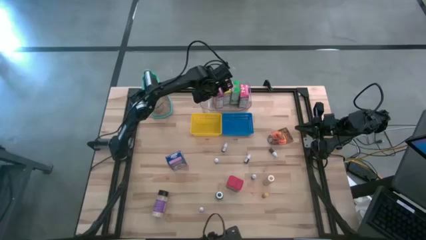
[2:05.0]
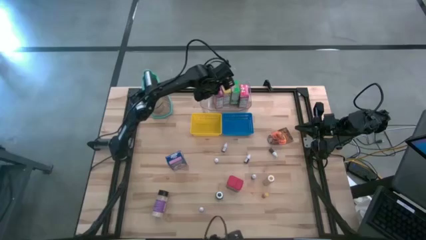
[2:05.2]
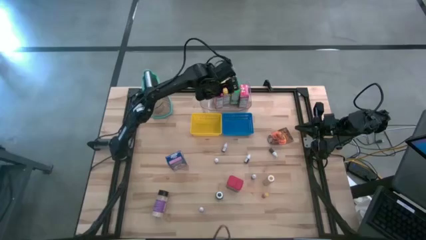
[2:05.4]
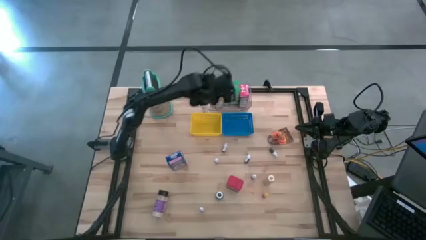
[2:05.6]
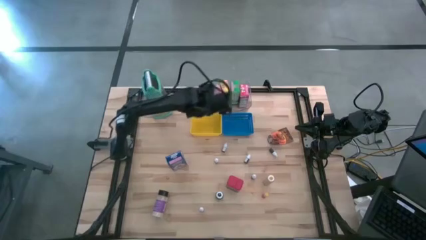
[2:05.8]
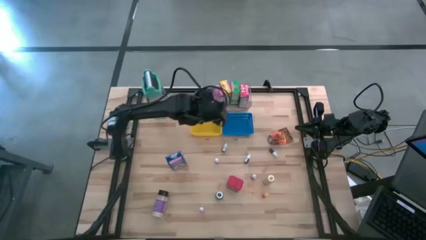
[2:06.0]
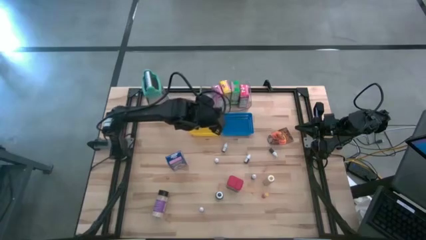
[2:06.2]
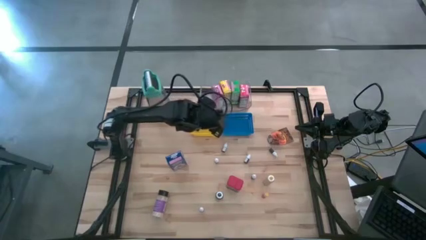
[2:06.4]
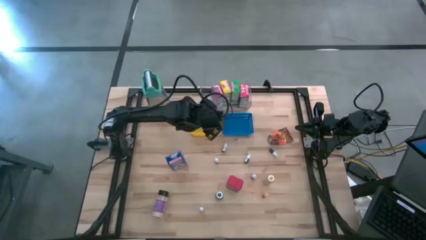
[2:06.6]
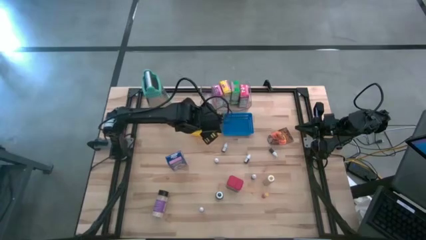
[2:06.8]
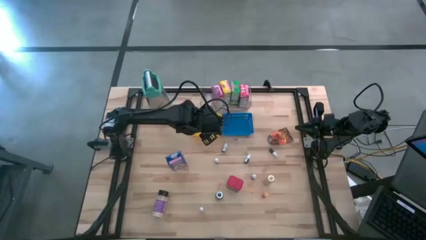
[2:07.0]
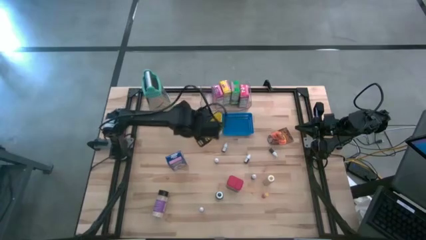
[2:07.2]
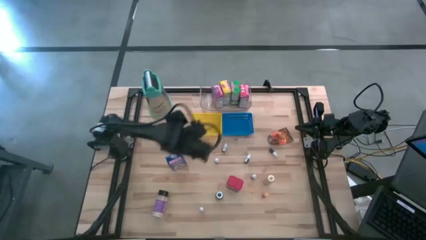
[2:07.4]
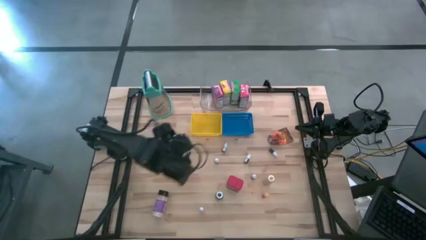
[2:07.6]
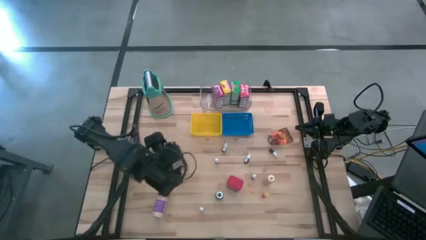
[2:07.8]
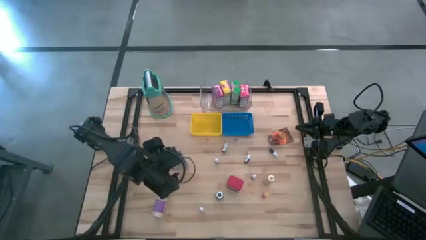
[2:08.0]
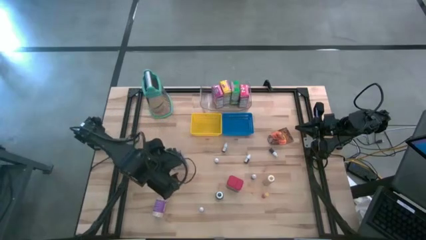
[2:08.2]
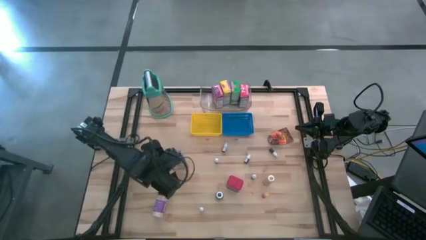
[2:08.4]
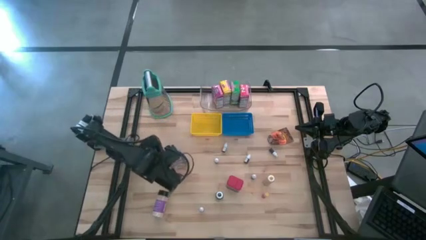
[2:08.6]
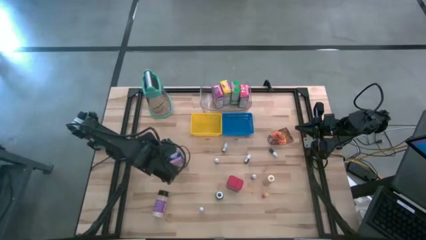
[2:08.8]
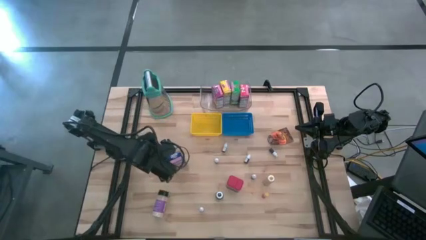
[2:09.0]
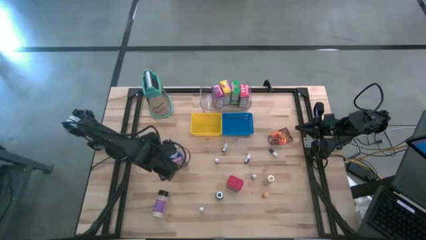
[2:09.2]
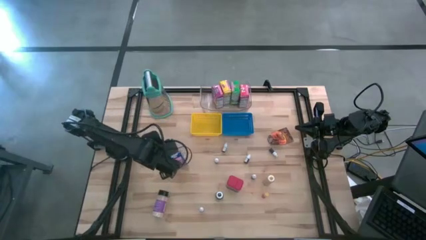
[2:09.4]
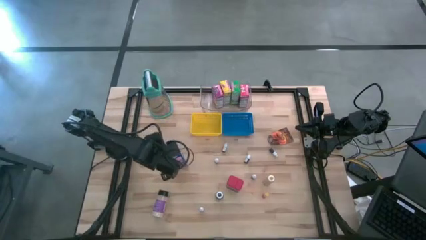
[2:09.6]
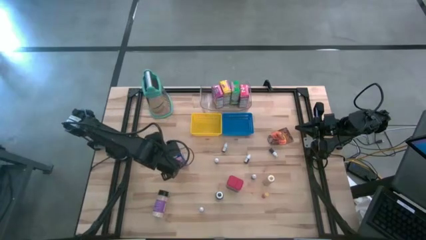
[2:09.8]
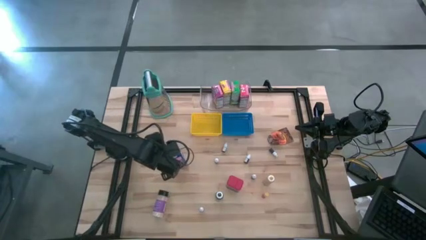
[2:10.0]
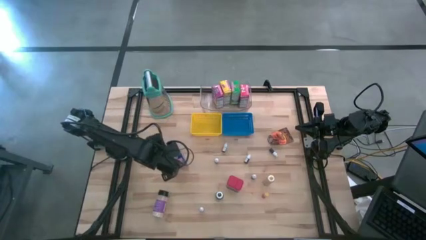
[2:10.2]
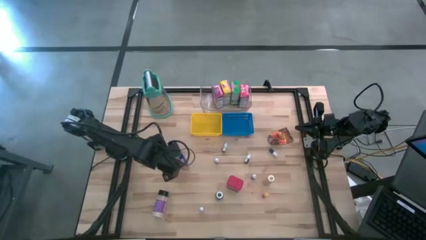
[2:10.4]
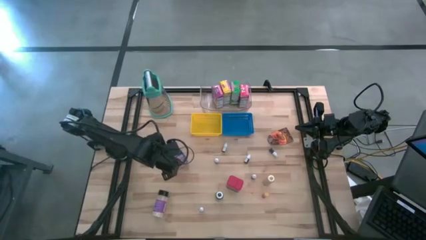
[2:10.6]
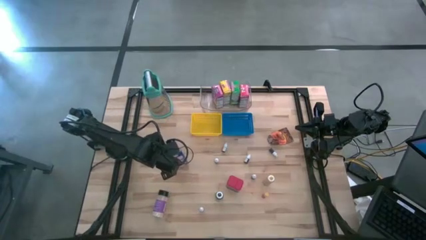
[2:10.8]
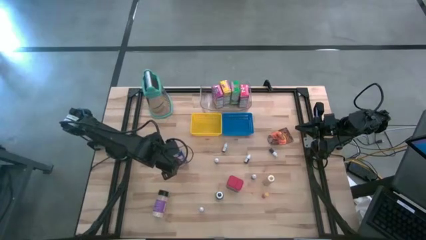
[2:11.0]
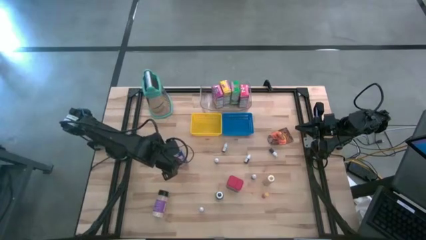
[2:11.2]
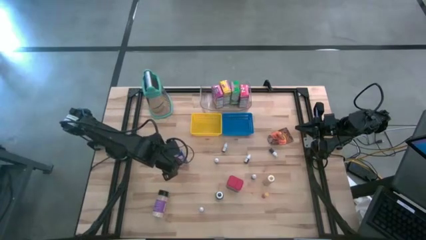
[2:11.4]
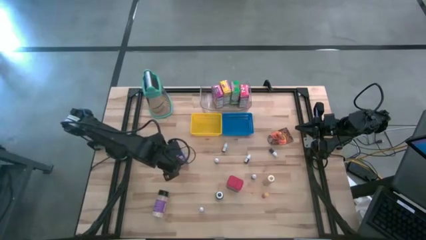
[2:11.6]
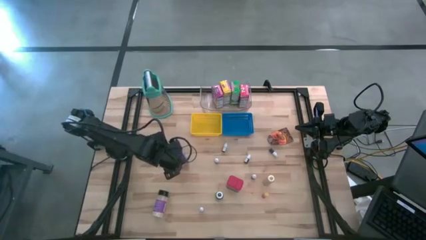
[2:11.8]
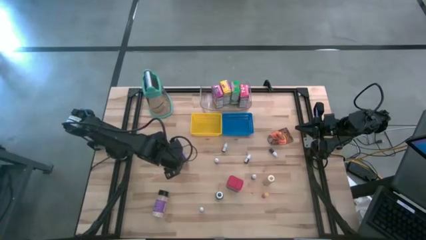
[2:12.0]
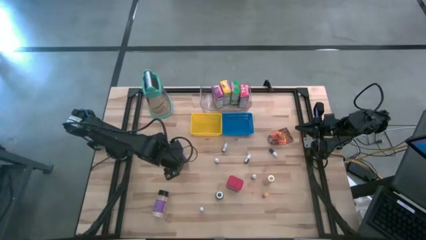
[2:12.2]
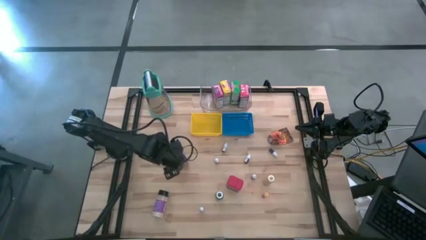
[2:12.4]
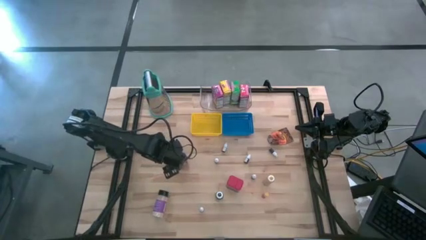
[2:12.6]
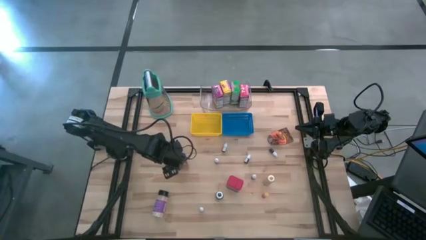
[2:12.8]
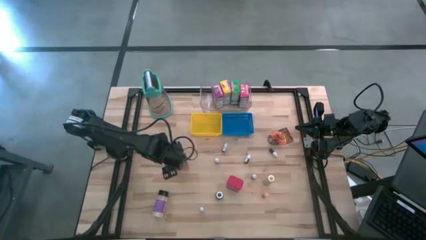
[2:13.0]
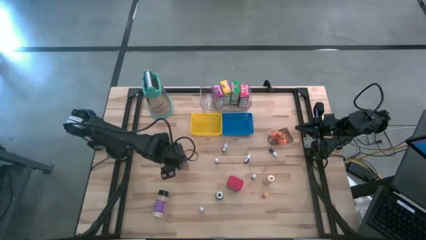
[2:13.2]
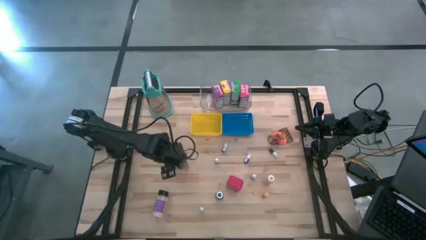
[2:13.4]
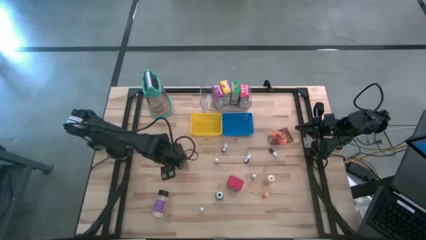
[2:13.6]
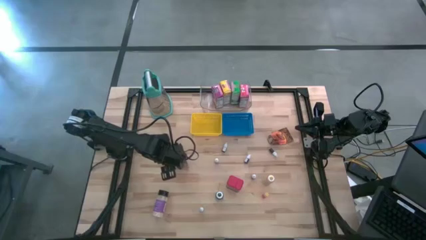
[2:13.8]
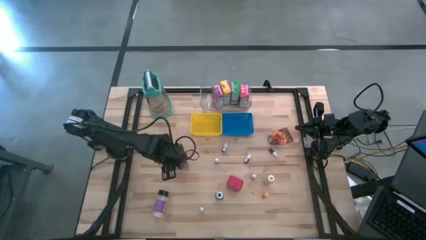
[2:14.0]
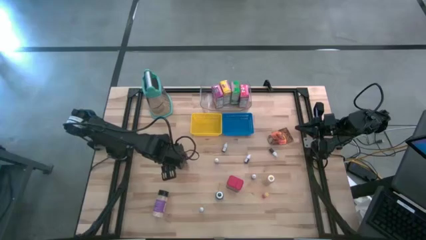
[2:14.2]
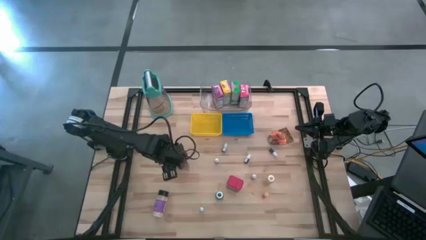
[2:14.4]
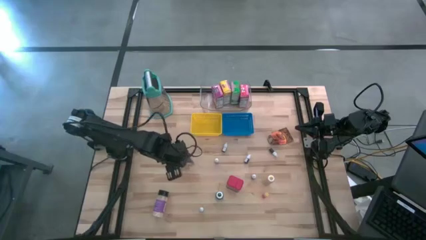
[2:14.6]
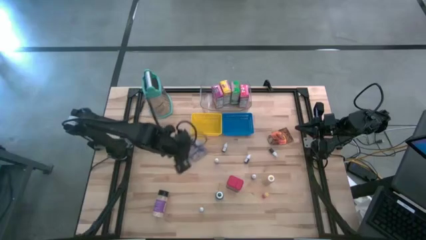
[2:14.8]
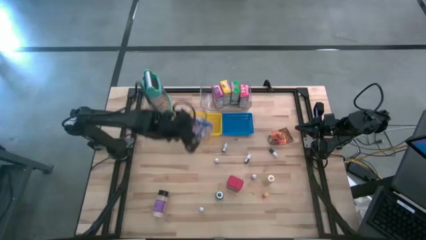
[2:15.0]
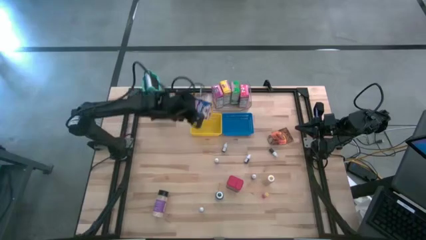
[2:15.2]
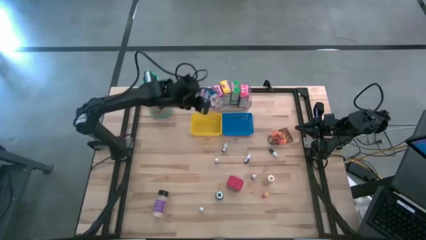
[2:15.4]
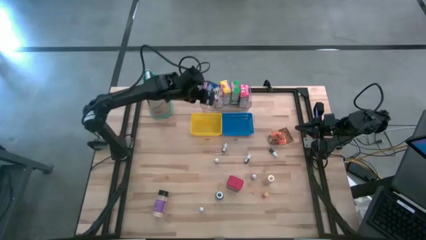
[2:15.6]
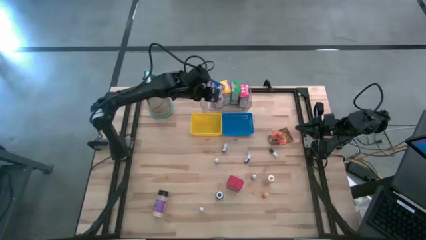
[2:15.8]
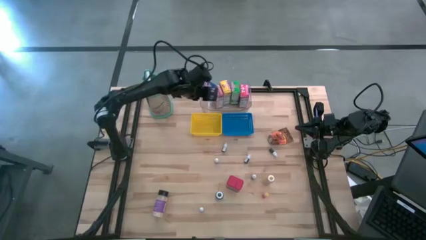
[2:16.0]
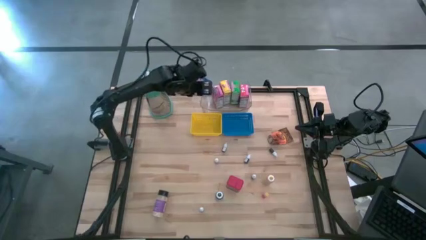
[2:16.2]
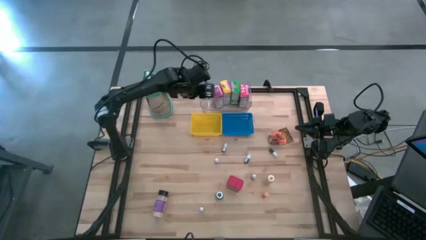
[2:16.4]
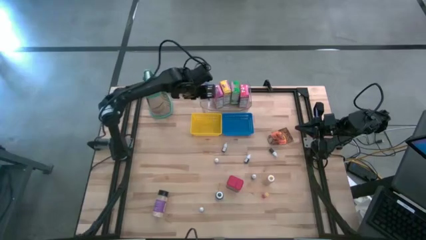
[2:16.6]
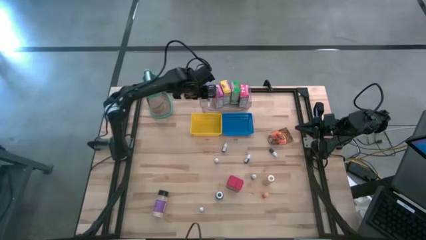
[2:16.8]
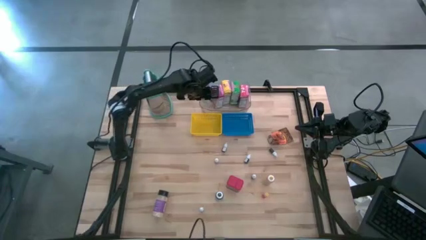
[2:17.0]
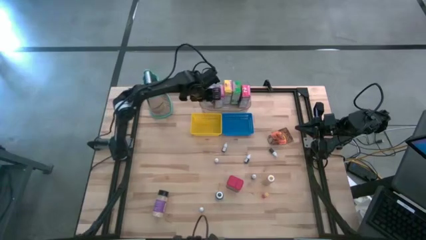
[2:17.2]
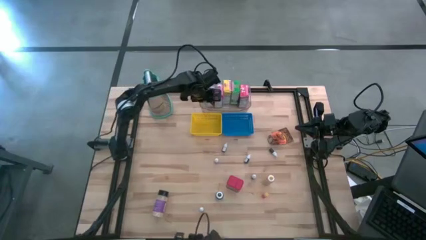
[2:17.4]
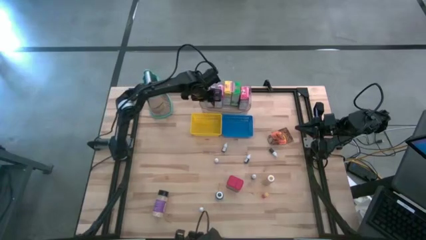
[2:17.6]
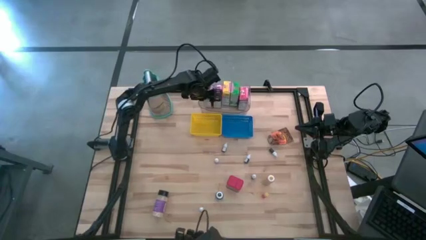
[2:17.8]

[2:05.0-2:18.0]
Task: Pick & Place Kitchen Items
Put the blue cereal box into the transparent bin

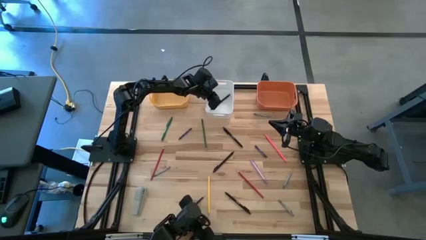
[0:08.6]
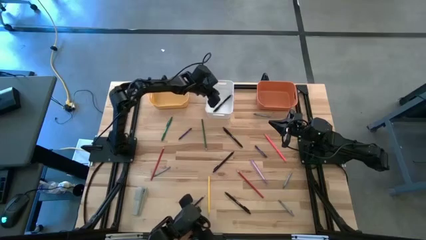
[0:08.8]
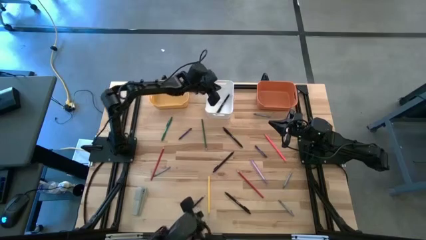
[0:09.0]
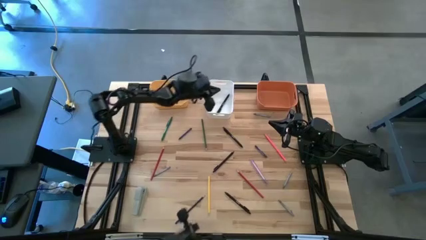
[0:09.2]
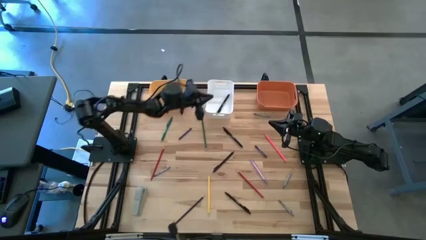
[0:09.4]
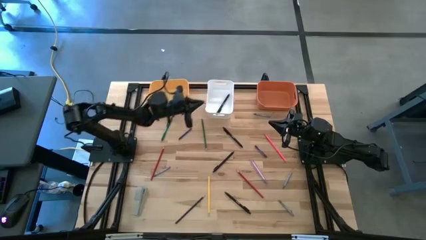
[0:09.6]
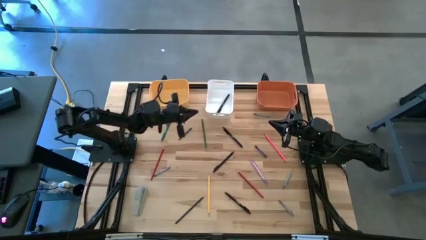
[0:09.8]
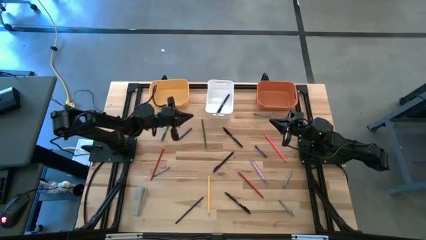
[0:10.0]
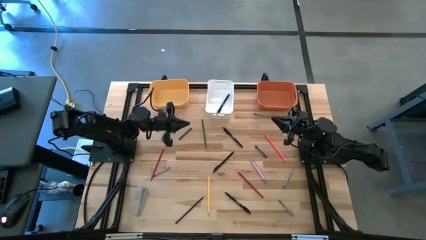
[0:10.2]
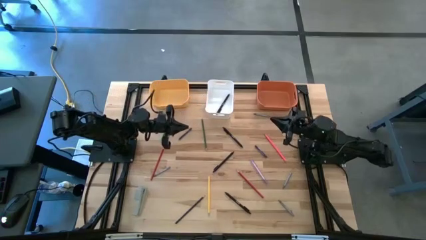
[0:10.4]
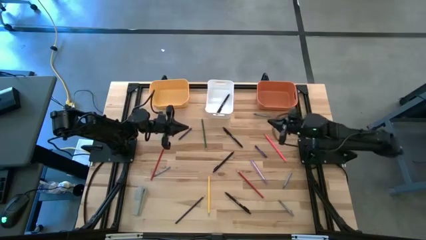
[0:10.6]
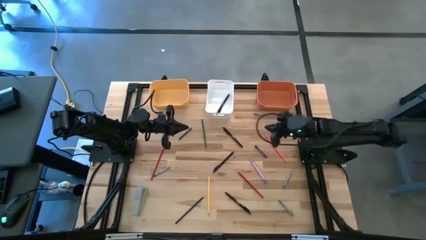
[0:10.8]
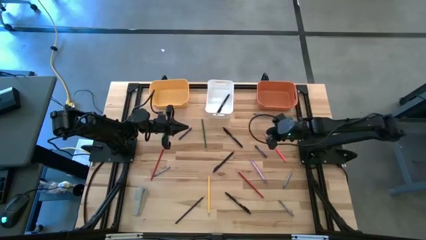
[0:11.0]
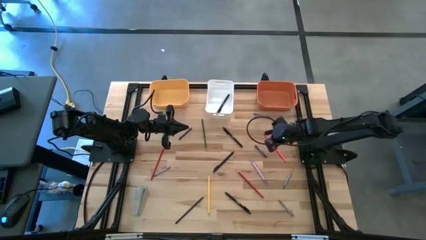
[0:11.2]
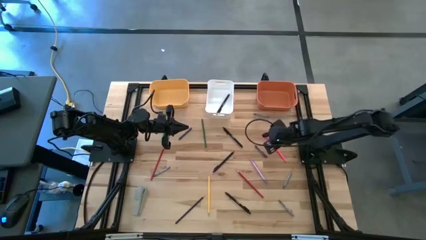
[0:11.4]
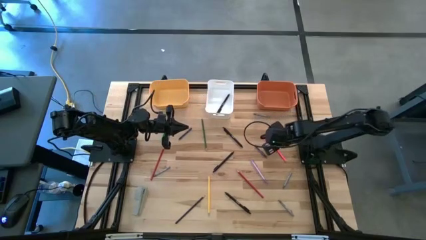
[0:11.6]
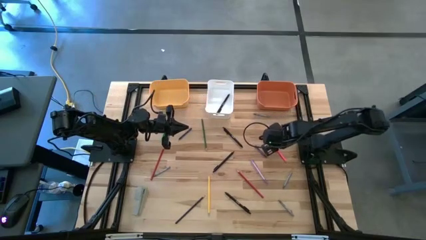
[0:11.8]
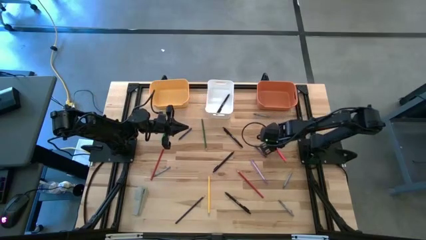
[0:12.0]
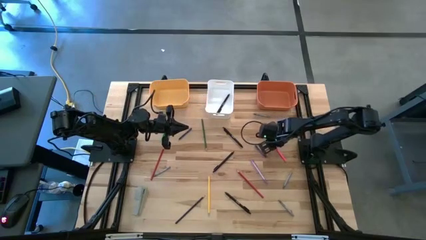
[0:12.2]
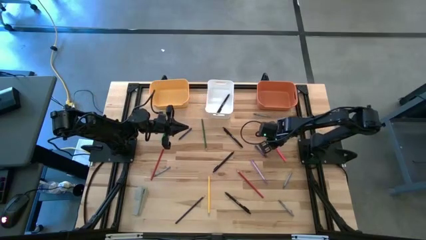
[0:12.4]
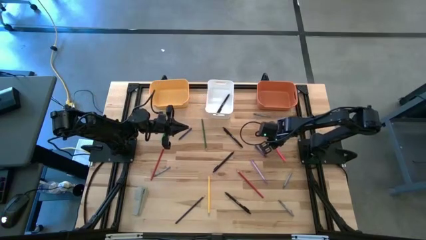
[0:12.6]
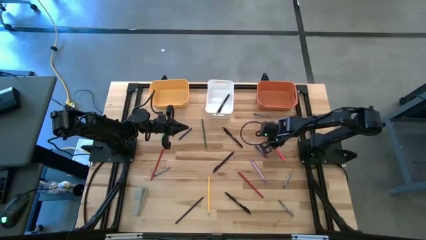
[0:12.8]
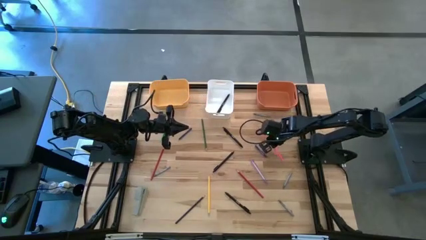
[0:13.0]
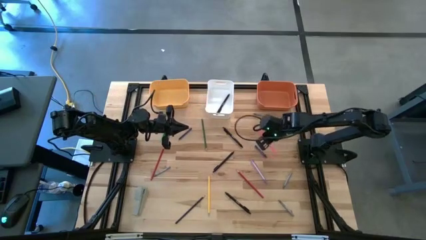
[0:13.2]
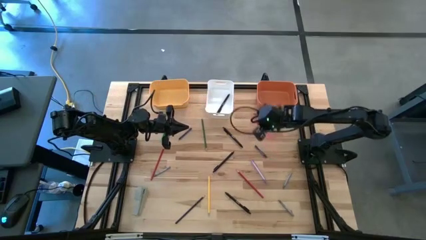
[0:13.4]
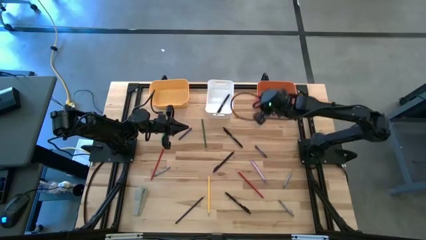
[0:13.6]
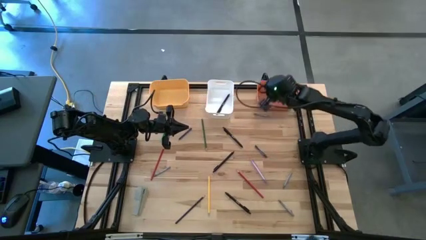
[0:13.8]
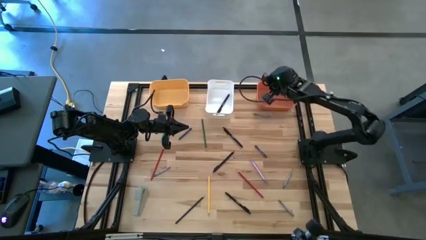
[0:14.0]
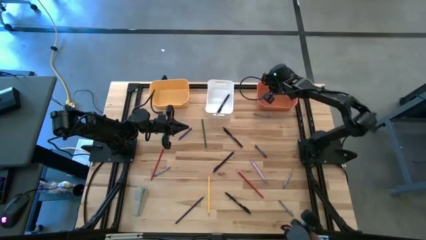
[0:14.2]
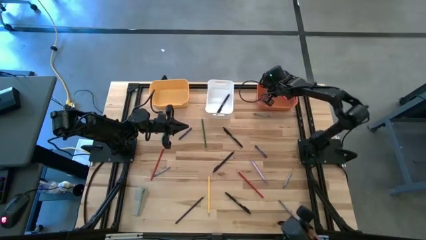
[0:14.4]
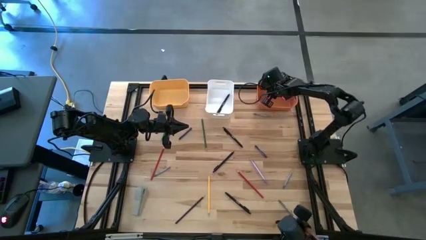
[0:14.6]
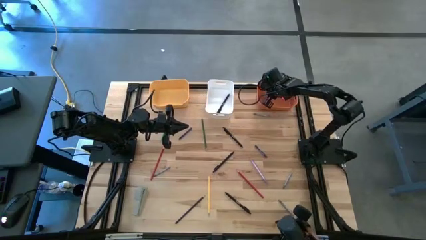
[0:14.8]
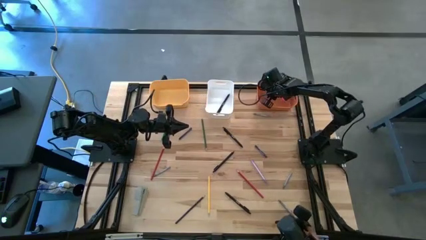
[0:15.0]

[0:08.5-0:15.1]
Task: Sort crayons/erasers/pens/pencils in bins
Put the pink pencil into the orange bin
